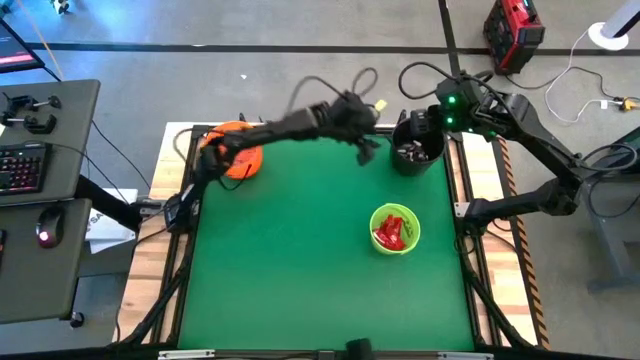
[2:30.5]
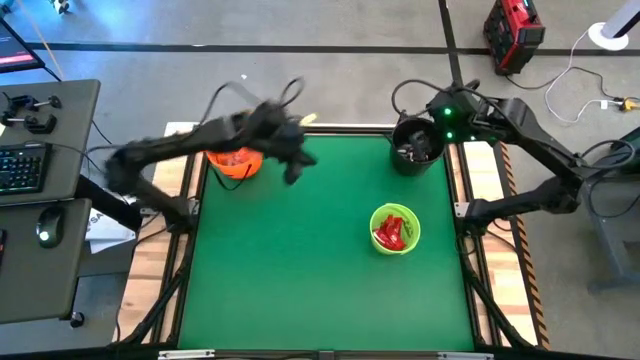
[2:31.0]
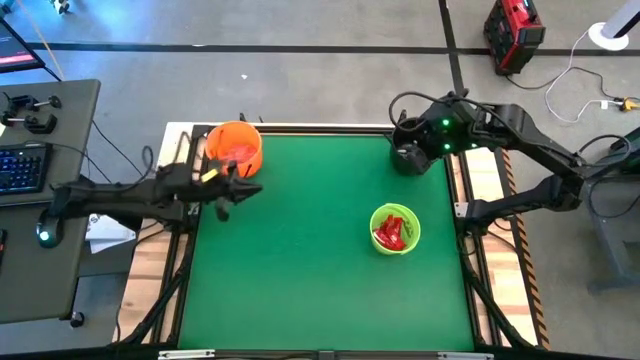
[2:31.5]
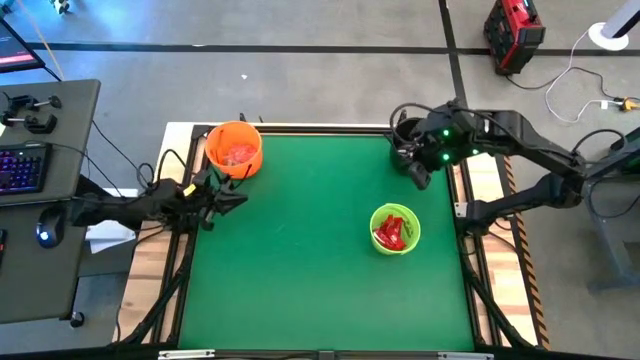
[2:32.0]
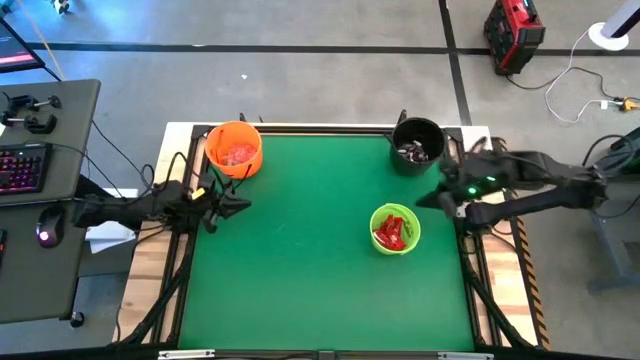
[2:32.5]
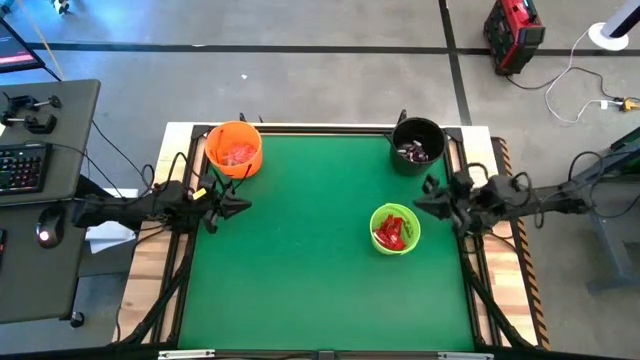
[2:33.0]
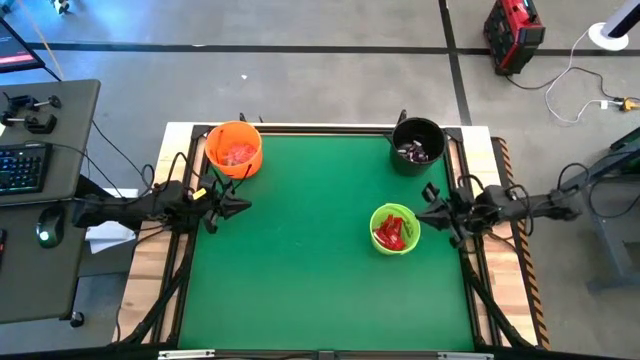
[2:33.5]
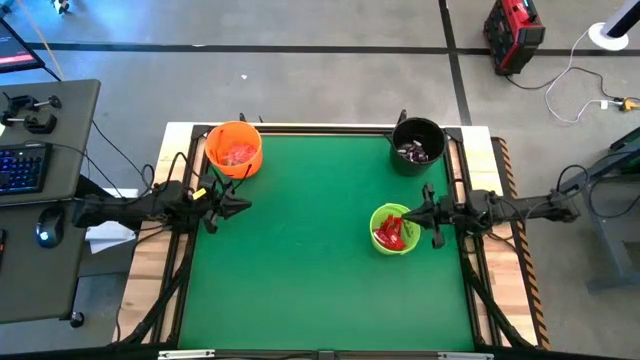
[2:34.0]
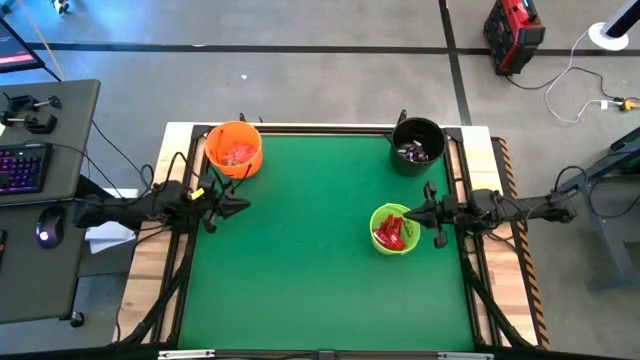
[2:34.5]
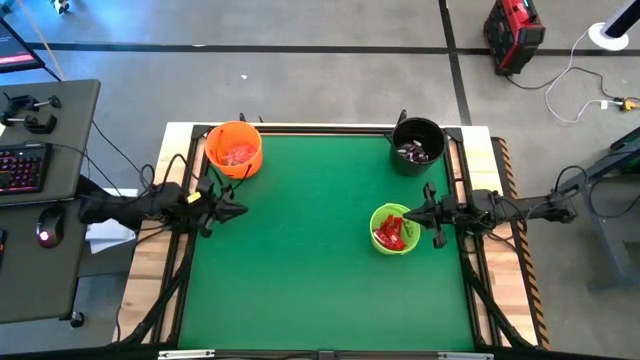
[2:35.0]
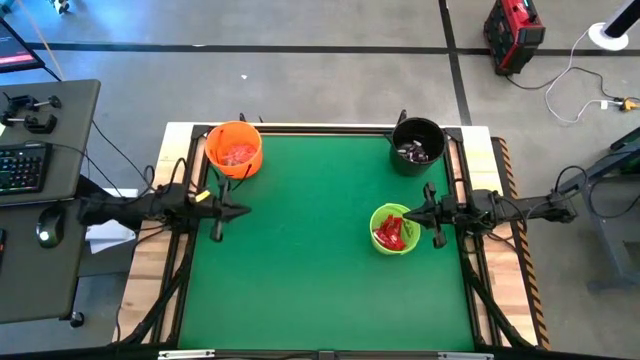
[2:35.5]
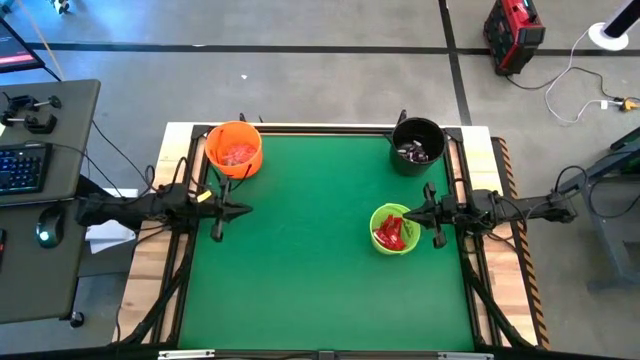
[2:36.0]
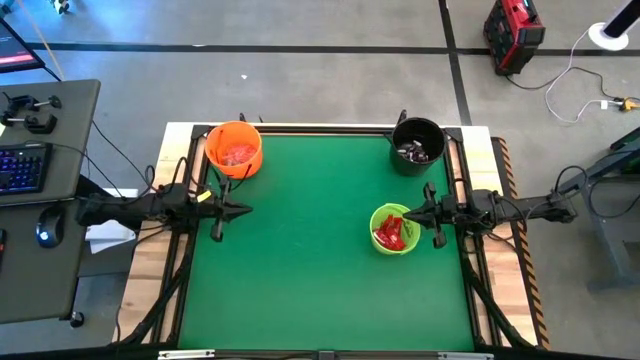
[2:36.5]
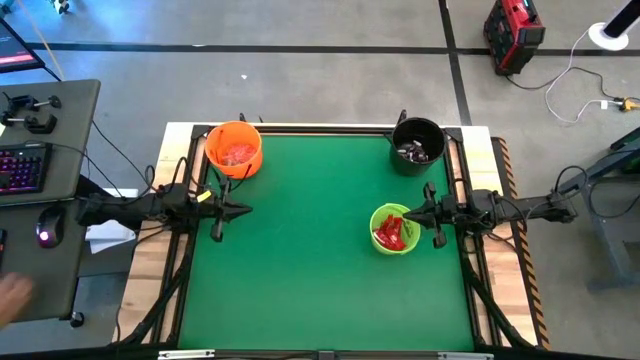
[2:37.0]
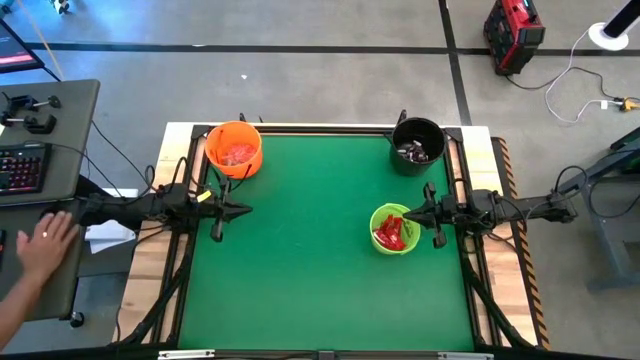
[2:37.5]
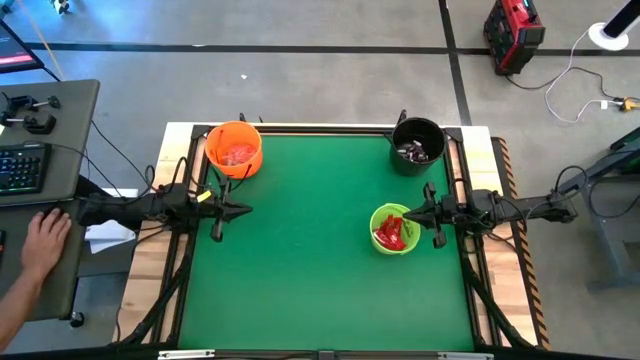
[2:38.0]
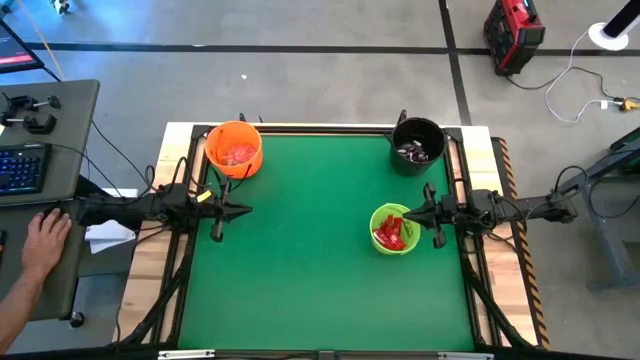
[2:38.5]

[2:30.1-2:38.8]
Task: Sort candy by brand, put in halloween buckets
Return to Home Position

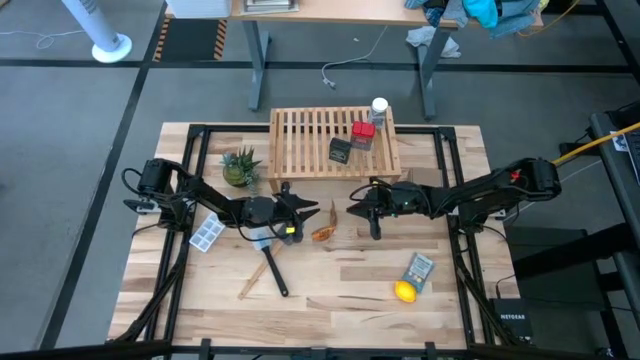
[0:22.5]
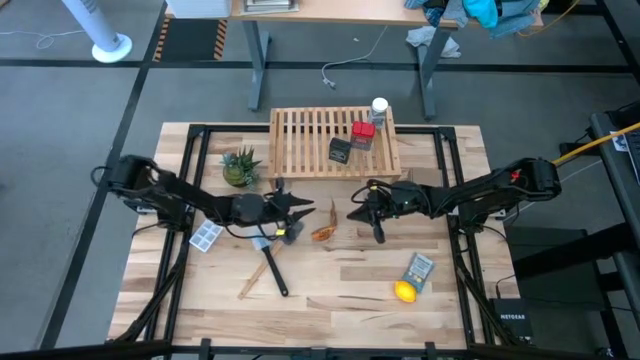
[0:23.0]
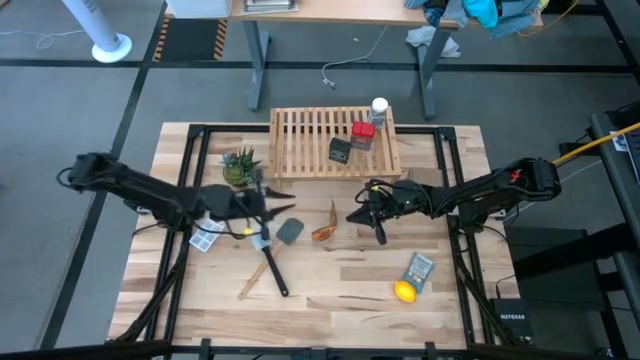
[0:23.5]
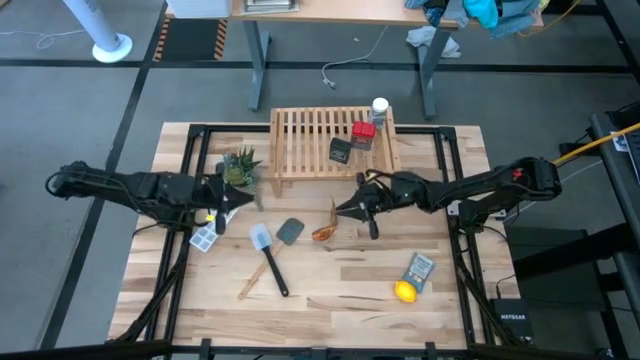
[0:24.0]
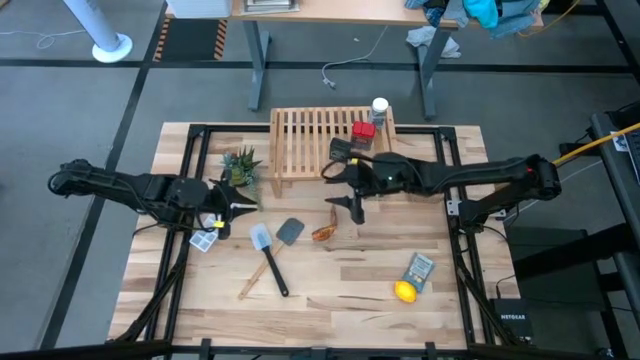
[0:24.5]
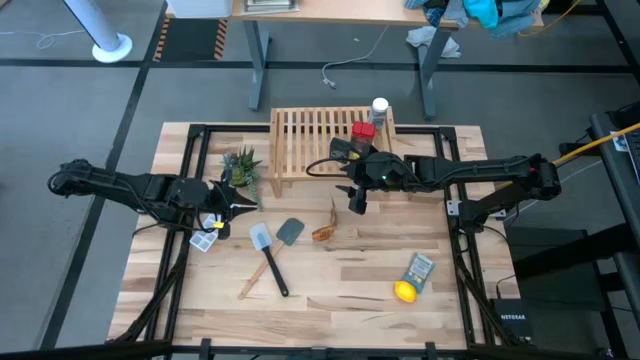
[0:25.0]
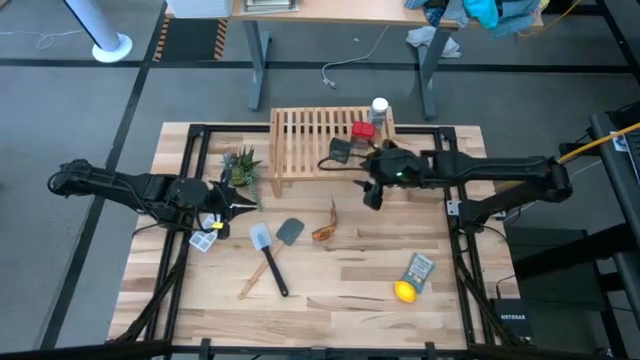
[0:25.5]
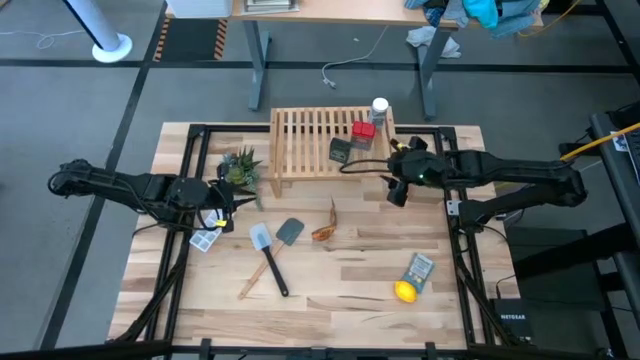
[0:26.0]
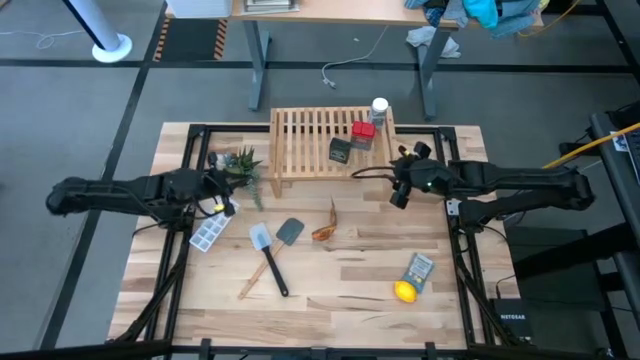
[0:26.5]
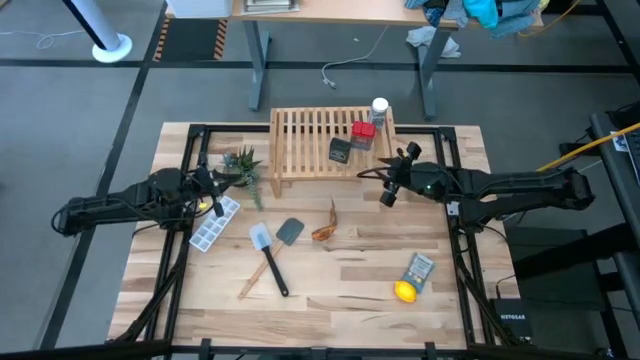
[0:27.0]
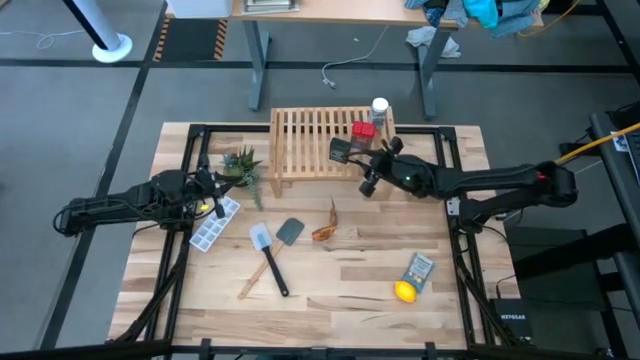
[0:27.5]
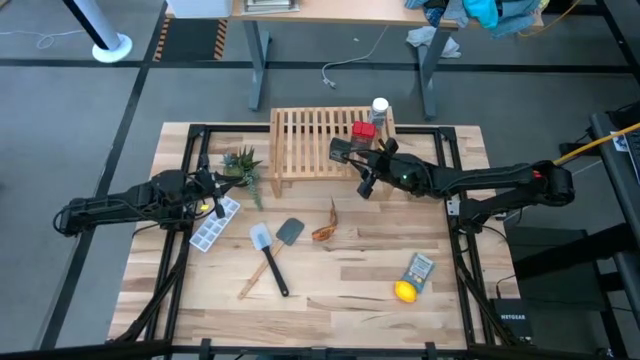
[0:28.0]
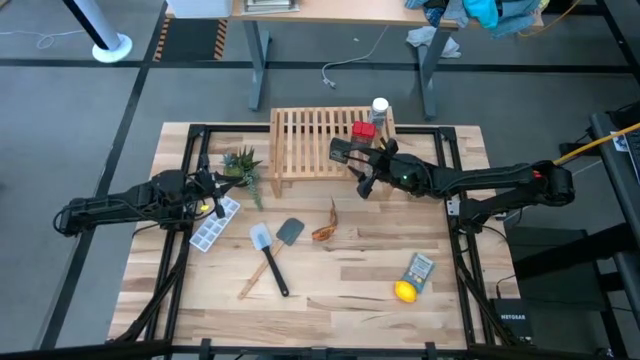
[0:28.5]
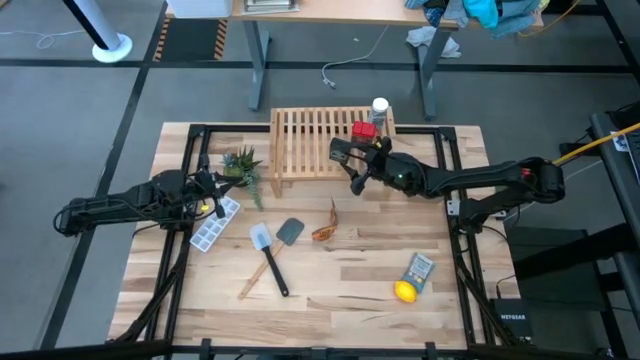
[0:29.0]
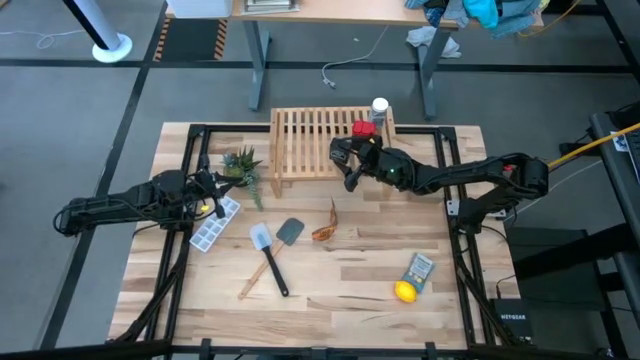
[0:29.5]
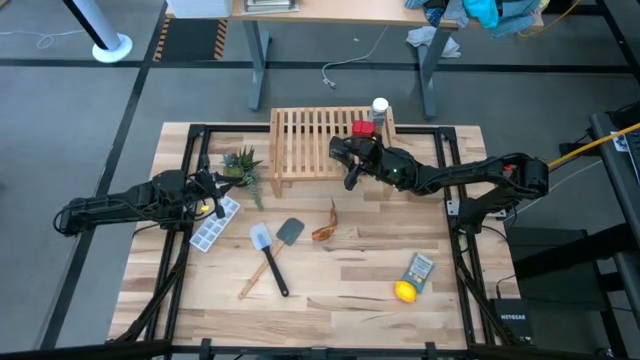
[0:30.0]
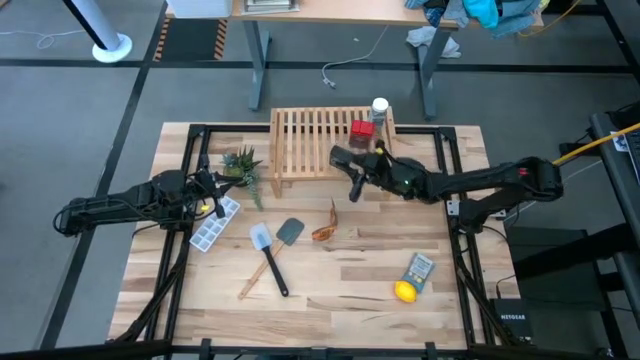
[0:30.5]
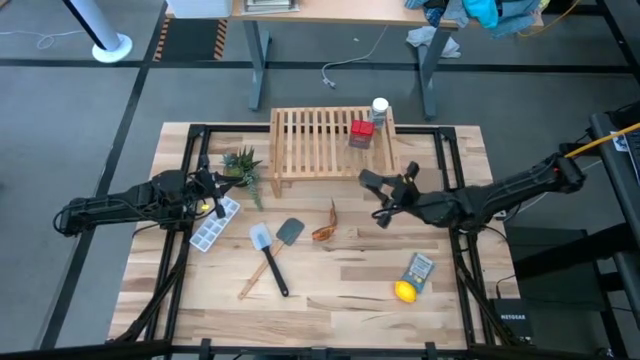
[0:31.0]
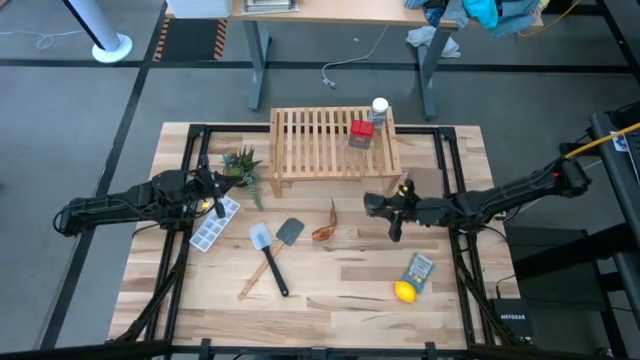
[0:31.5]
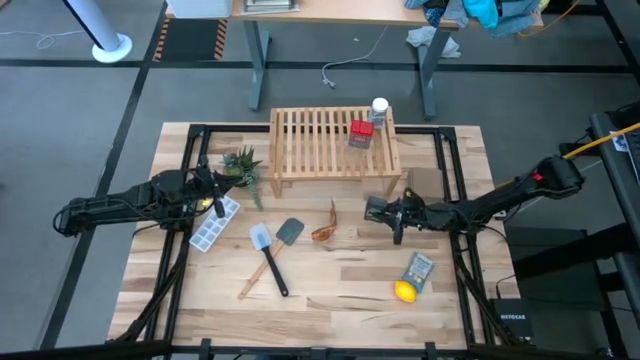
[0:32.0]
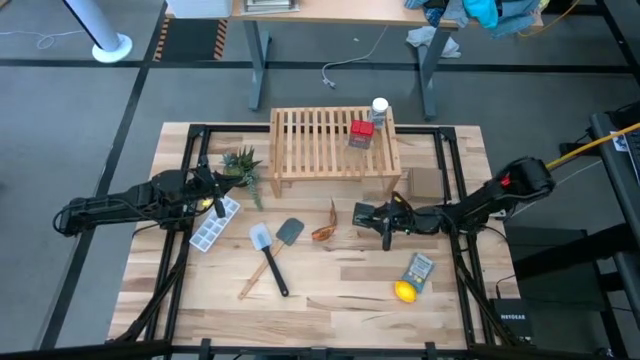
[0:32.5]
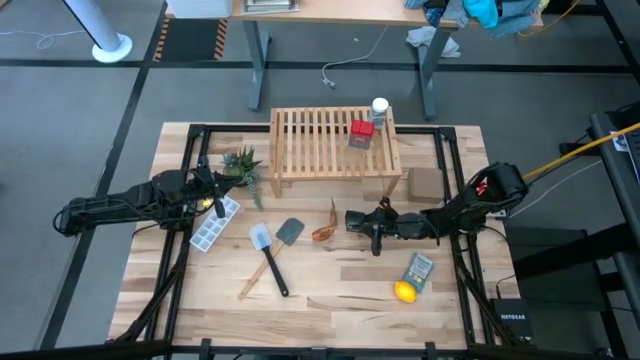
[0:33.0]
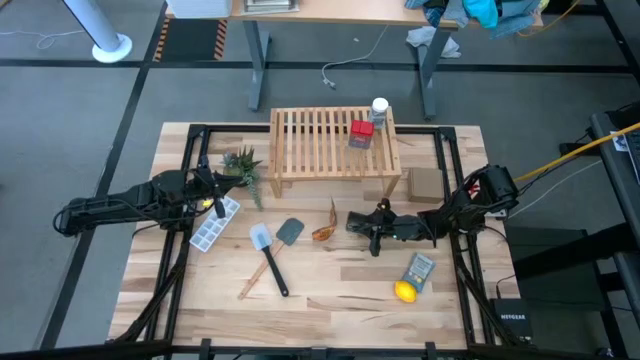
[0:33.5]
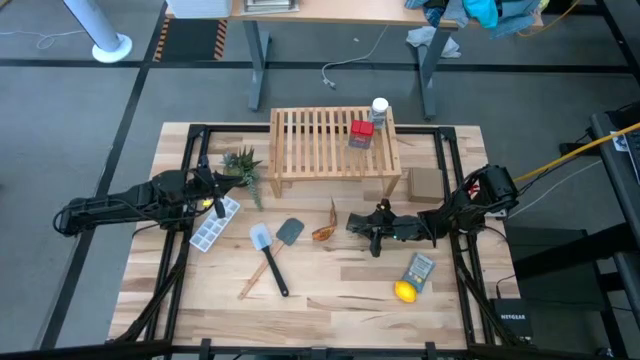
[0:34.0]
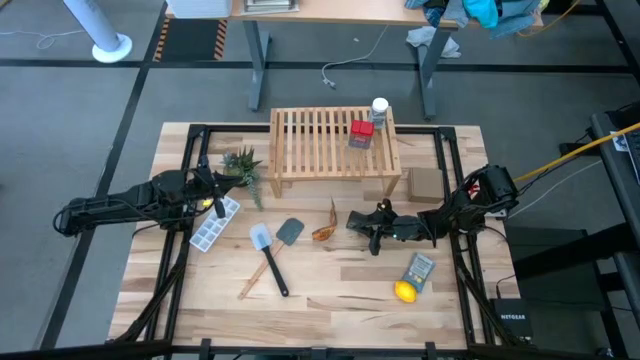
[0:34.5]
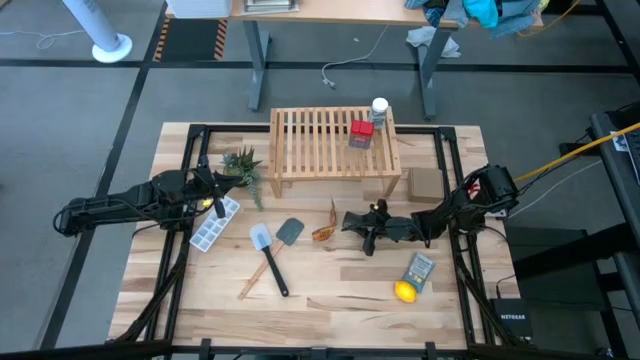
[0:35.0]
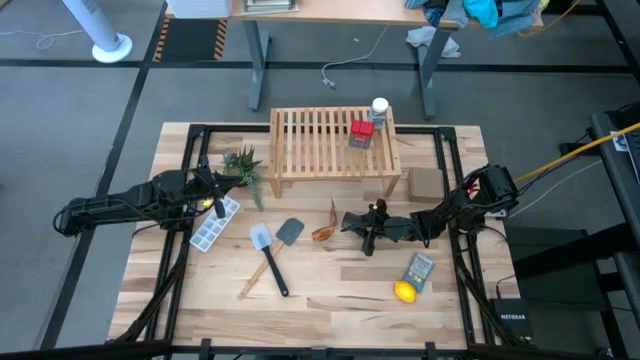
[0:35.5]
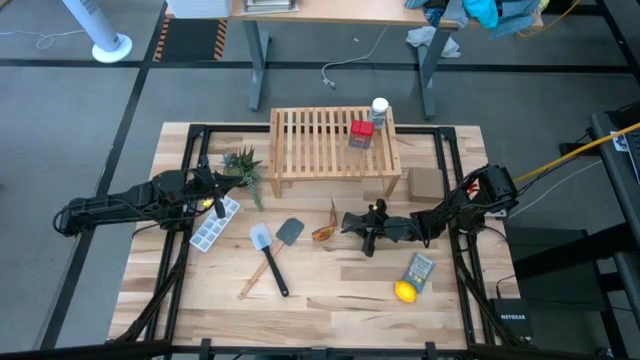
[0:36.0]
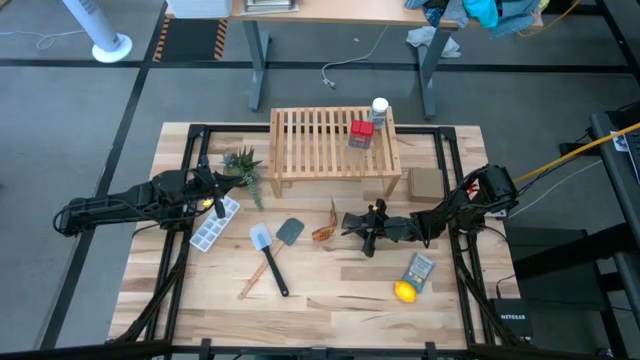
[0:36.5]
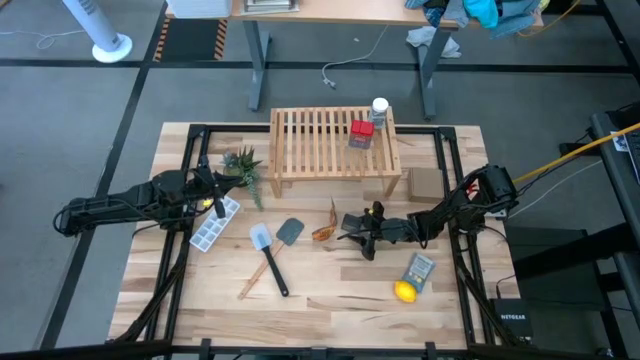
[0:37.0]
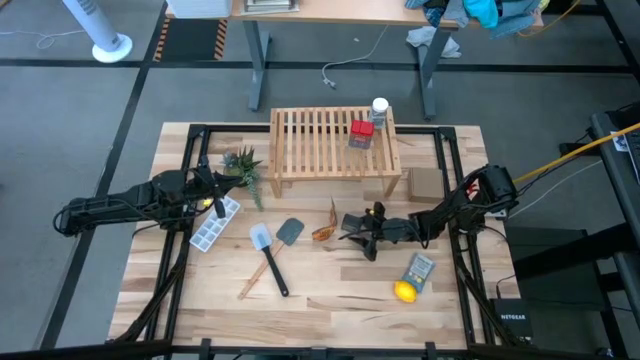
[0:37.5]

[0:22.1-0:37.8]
Task: Shelf spices
Remove the black seasoning can from the shelf
